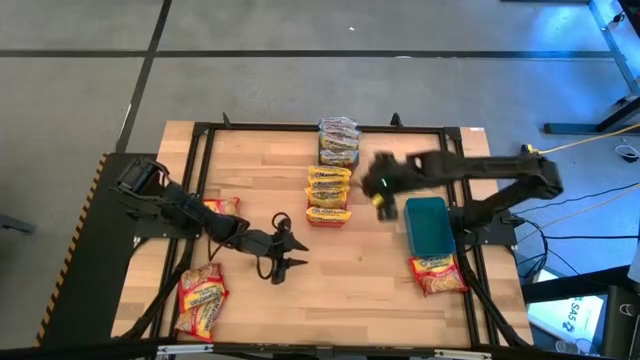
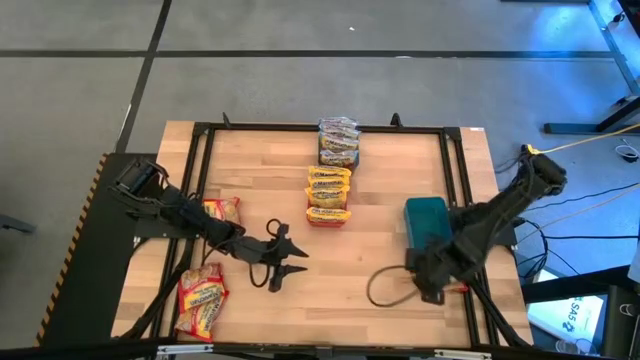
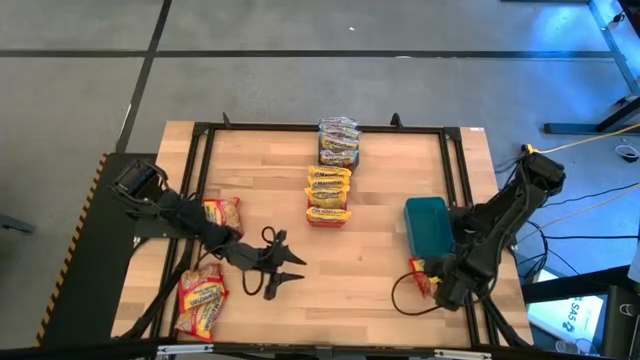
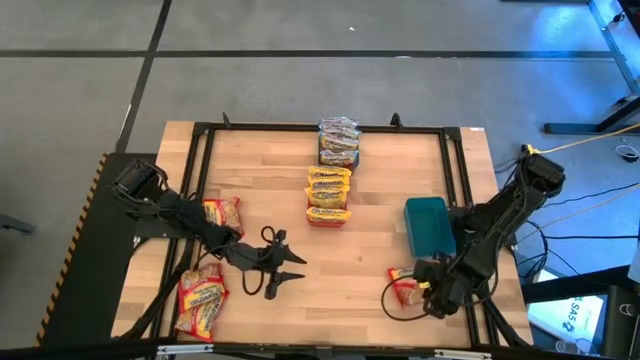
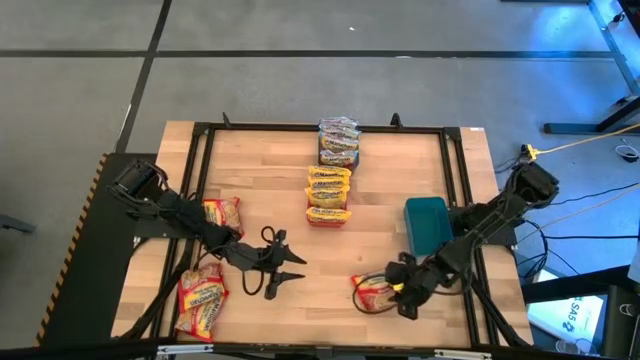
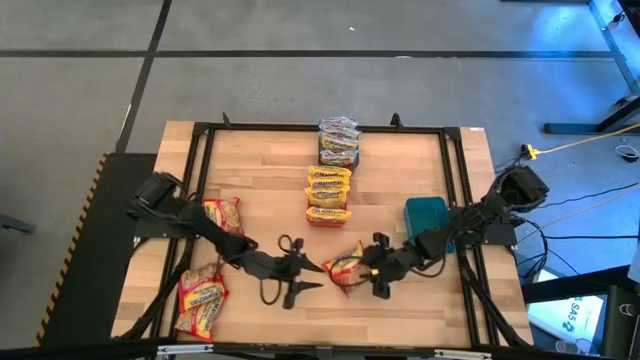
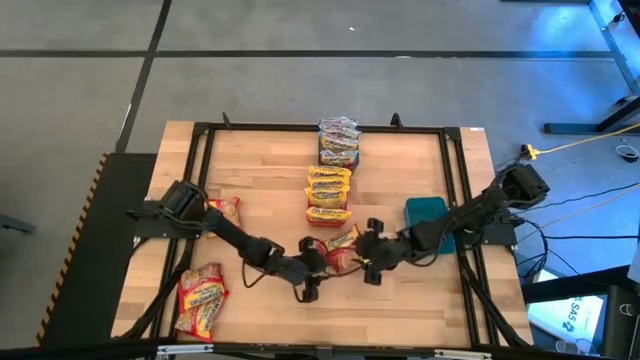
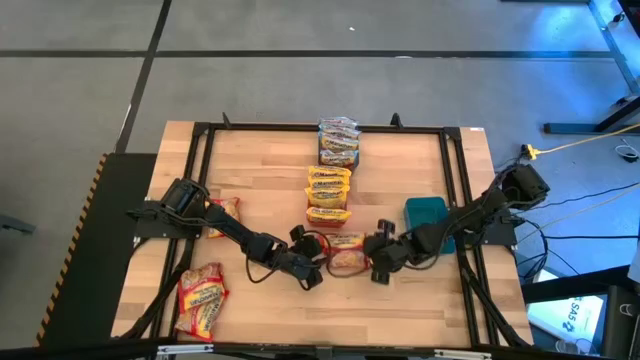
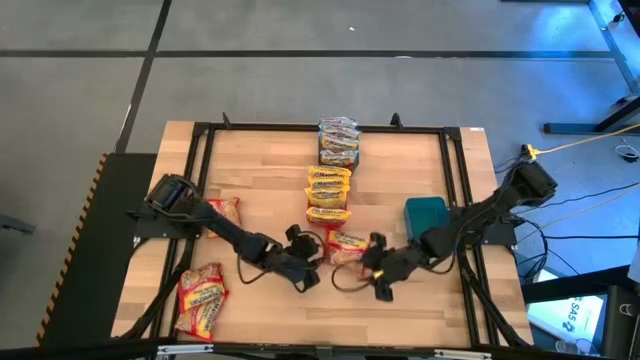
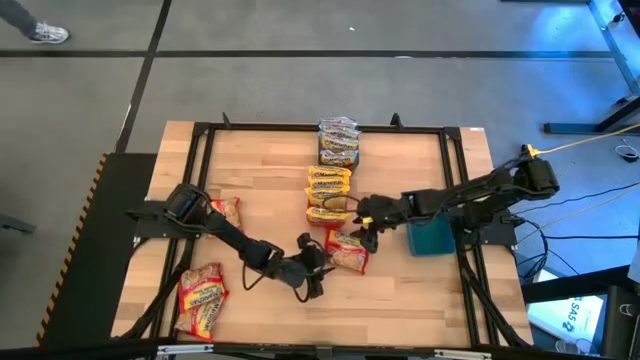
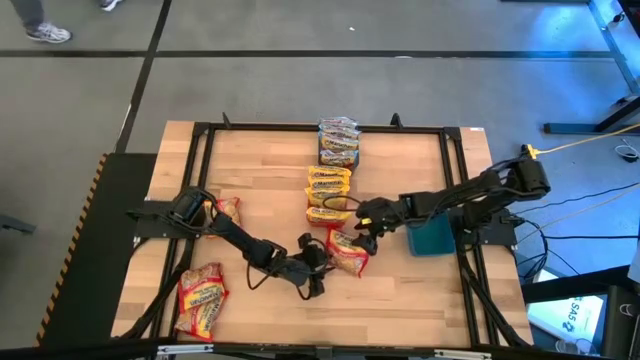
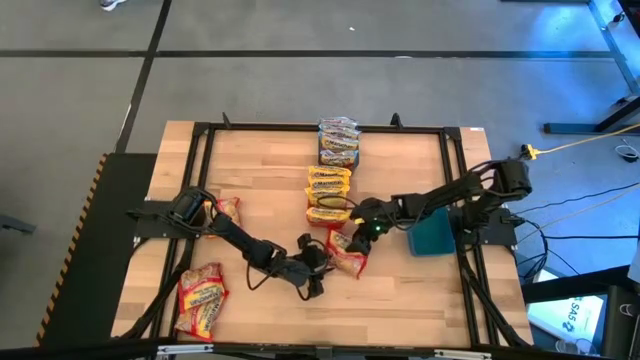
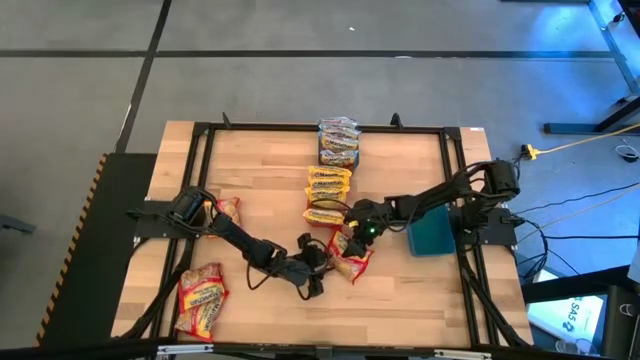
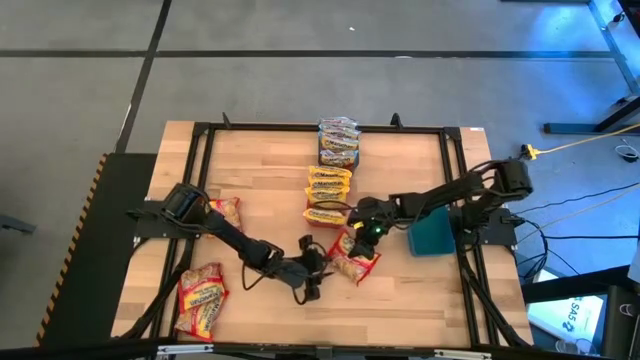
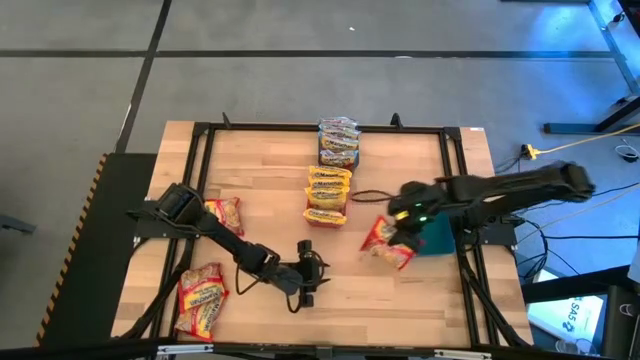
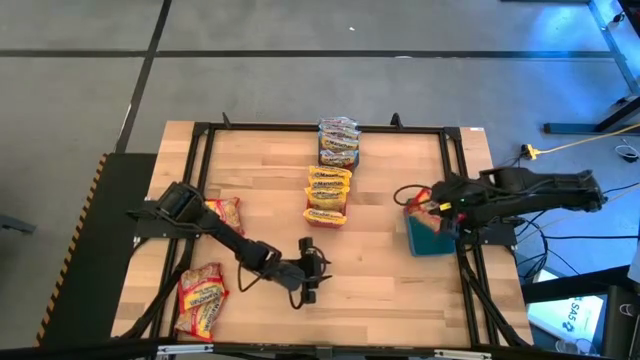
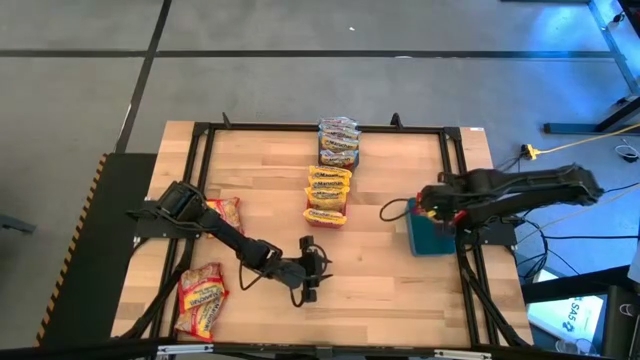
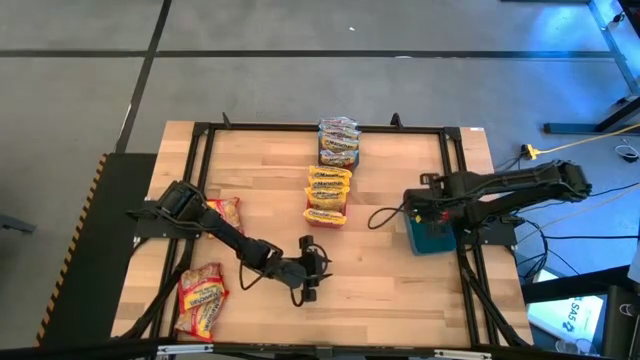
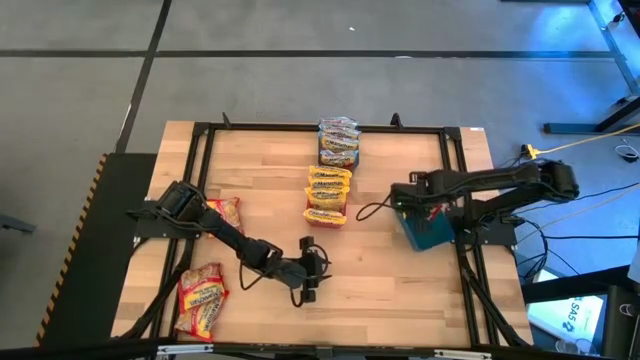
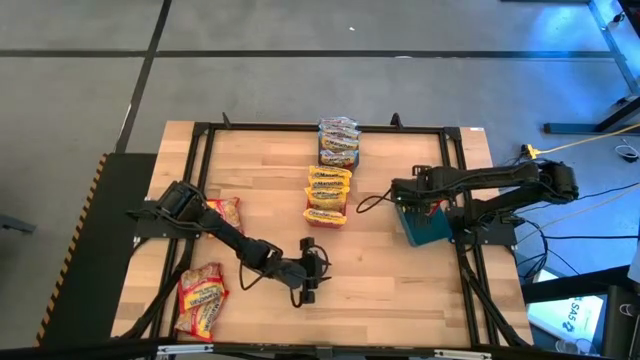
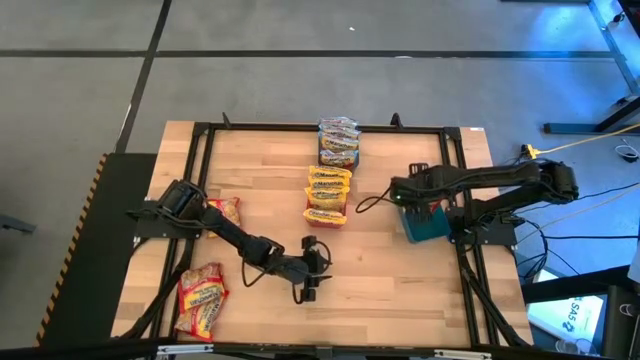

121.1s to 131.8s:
Task: Sort Maruchan noodles
Put the orange noodle pack into the blue bin

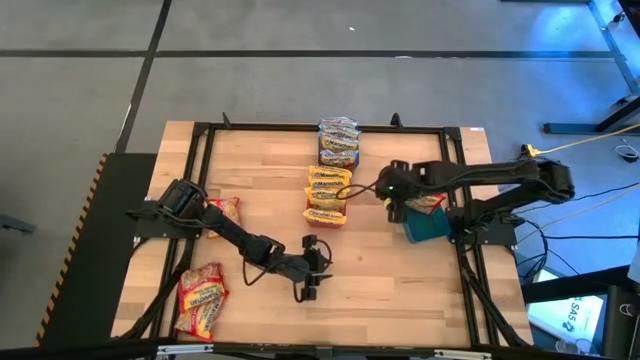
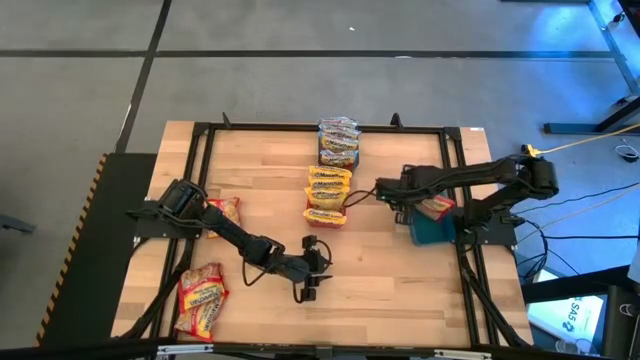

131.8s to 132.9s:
Adjust the blue bin

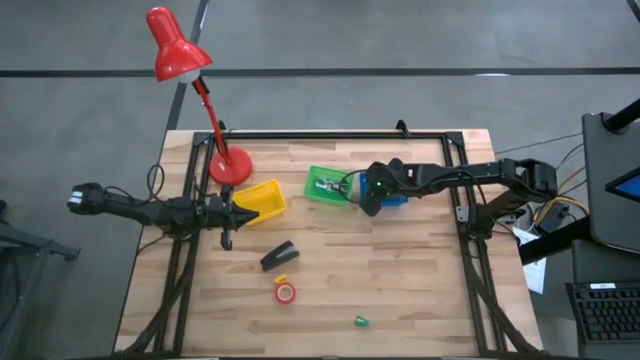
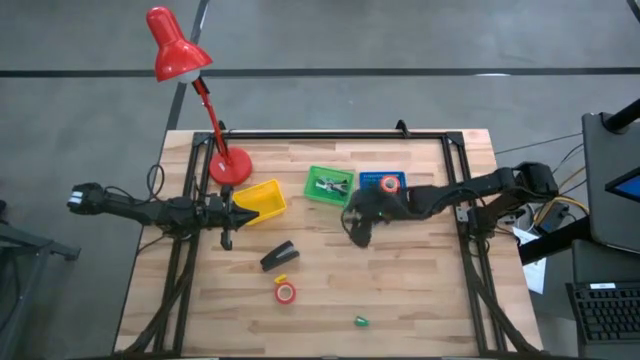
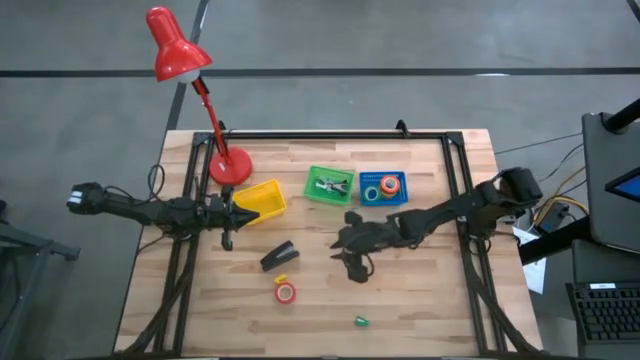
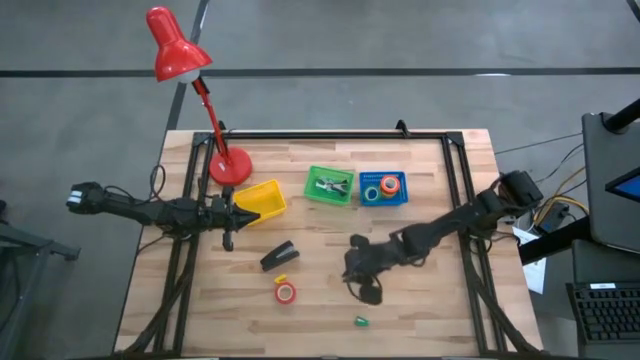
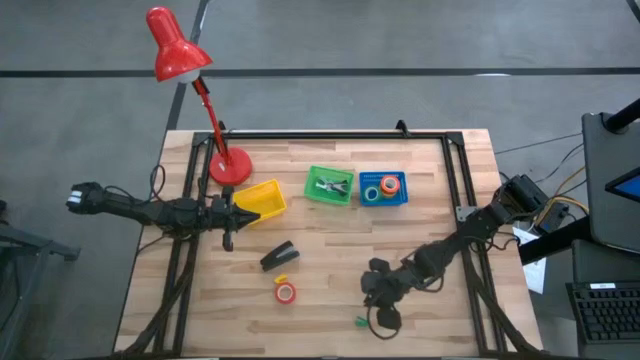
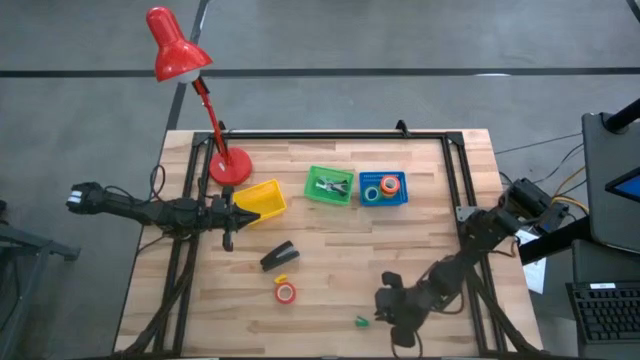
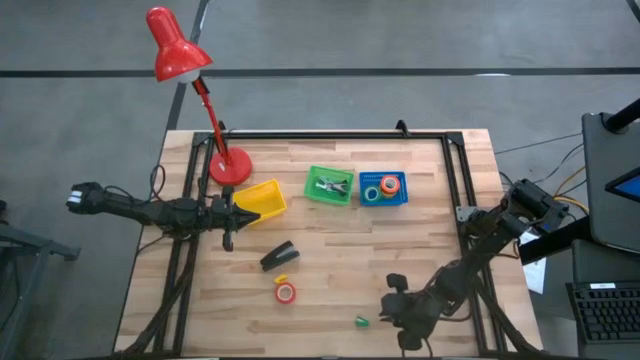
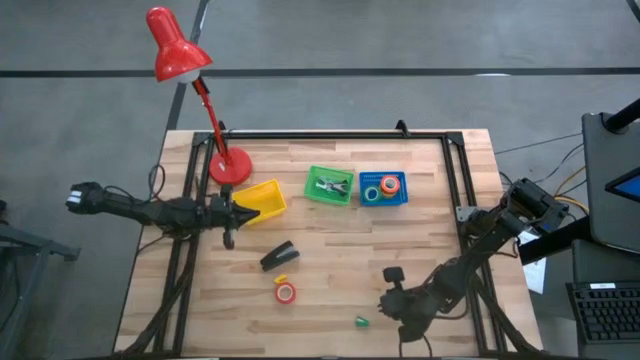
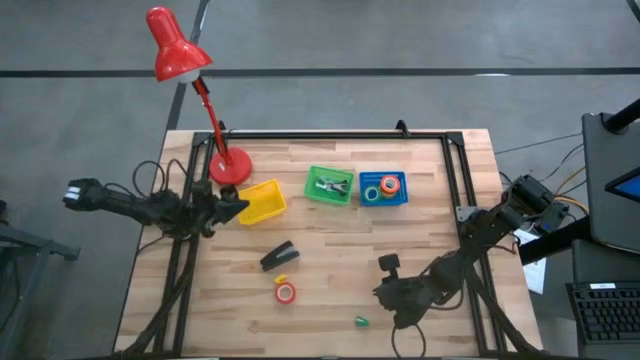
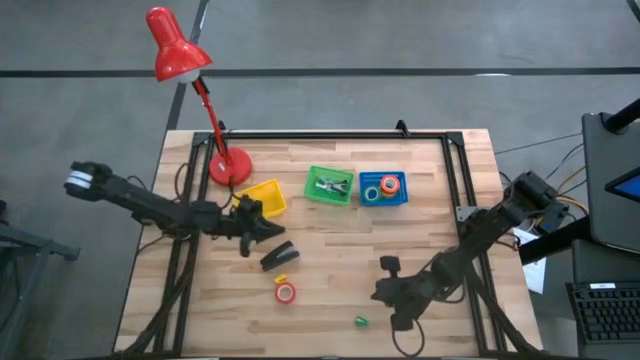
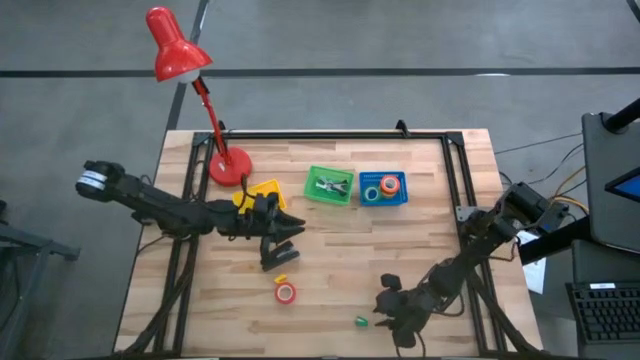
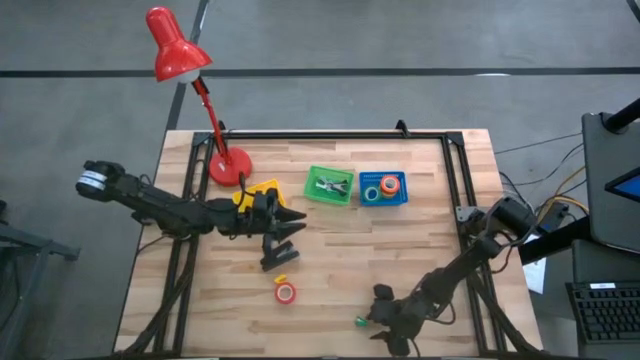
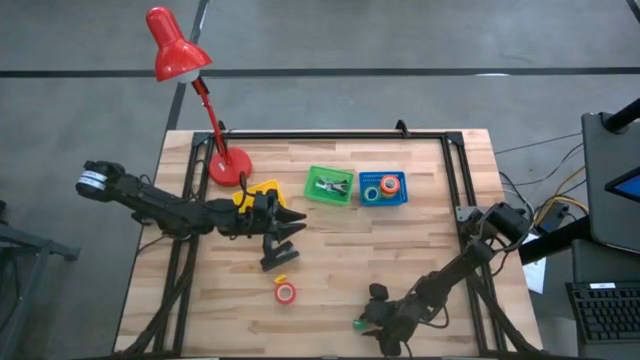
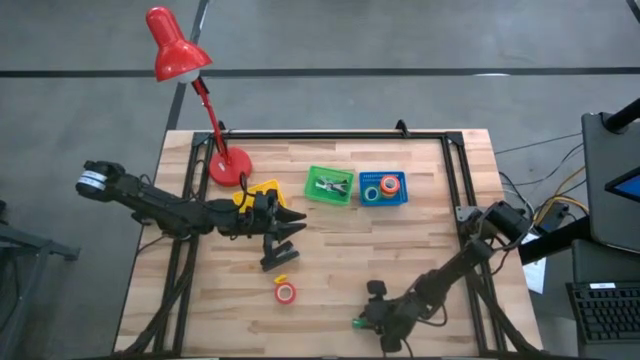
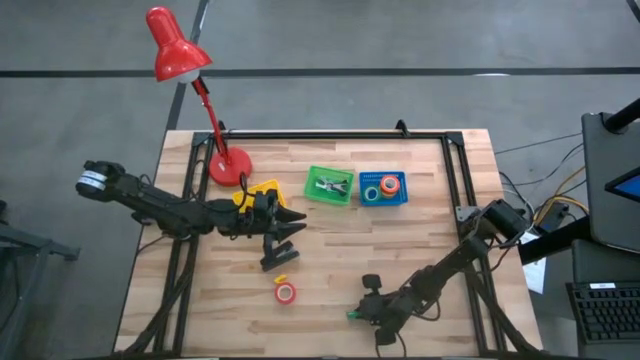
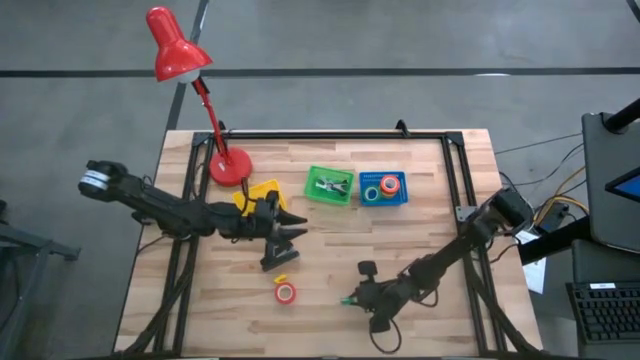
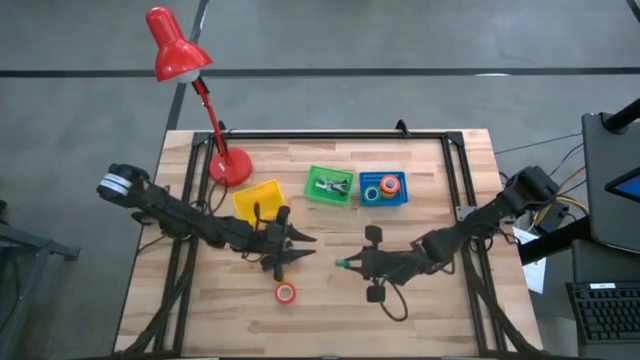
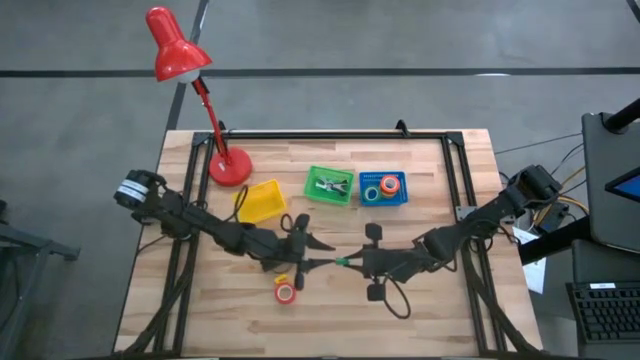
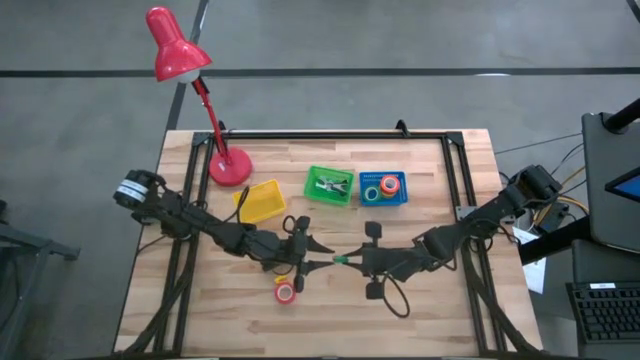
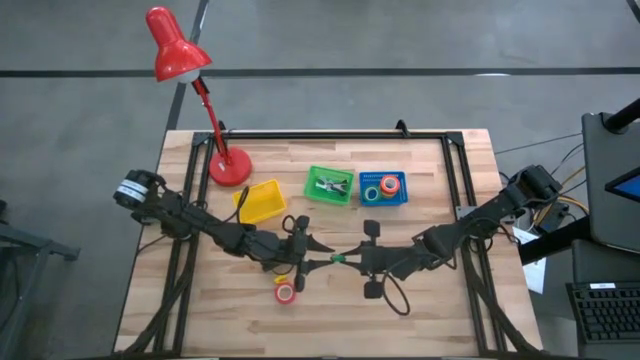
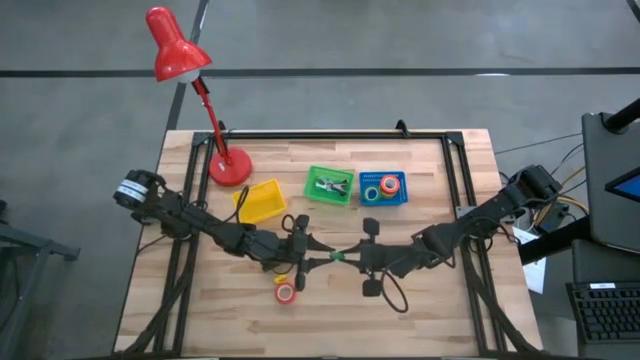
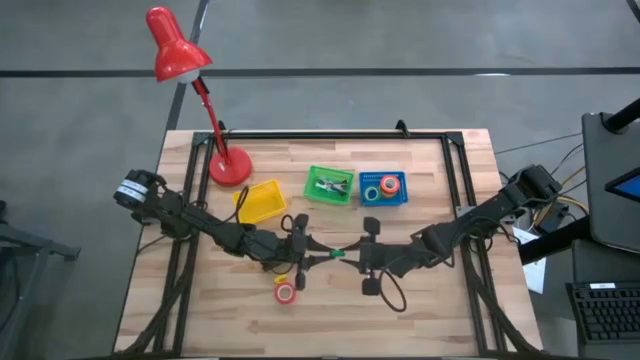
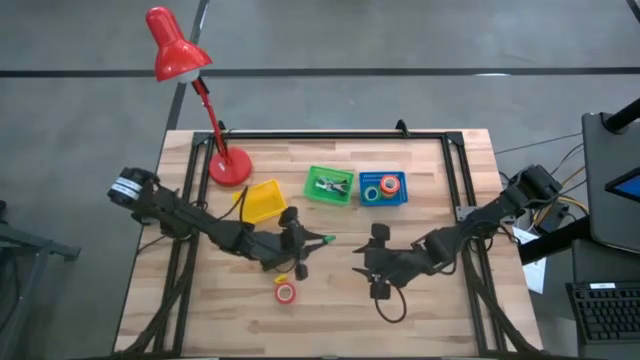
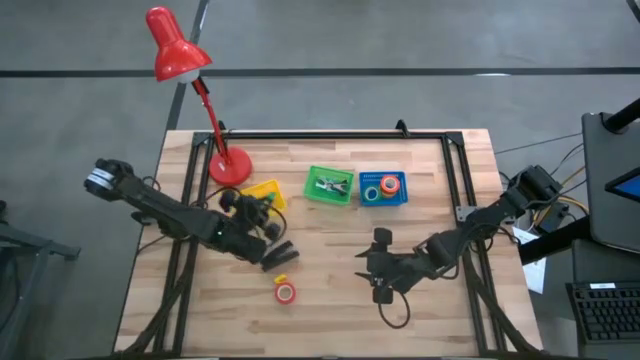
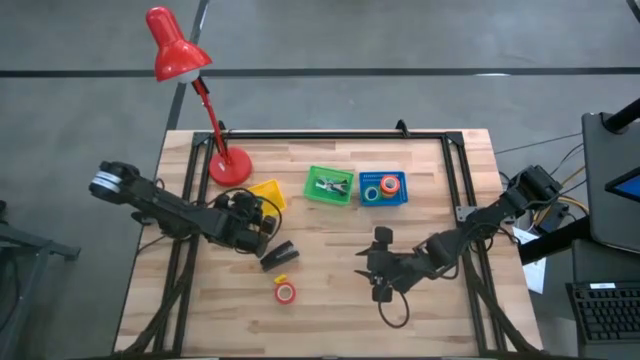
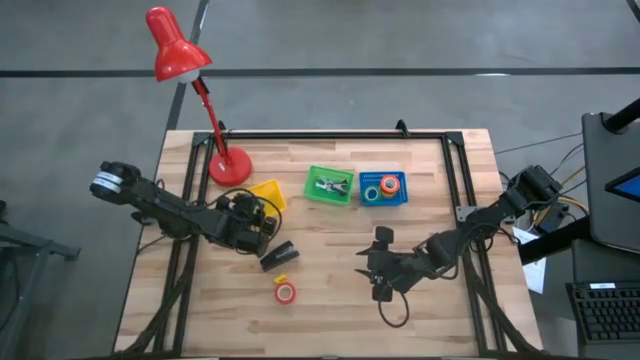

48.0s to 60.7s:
Task: Pick and place Stapler, Stapler remover, tape
Put the small green stapler in the yellow basket
